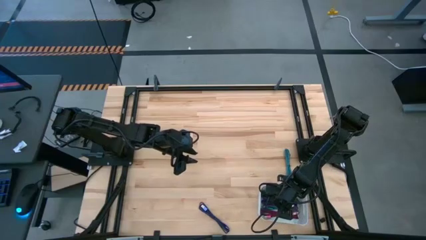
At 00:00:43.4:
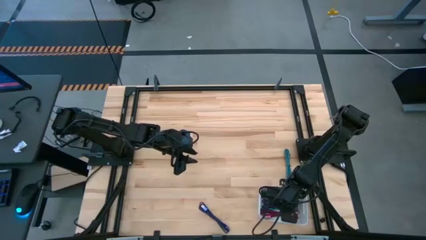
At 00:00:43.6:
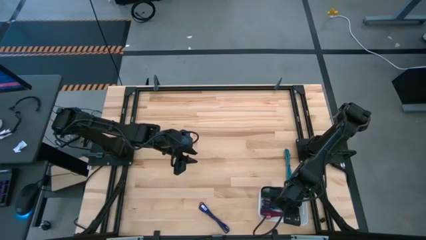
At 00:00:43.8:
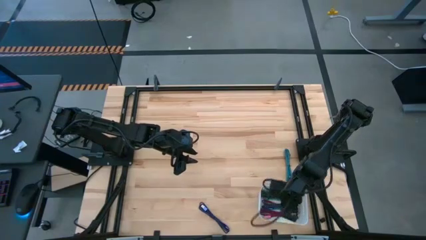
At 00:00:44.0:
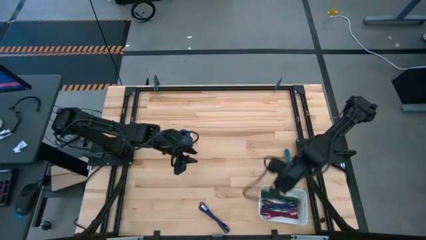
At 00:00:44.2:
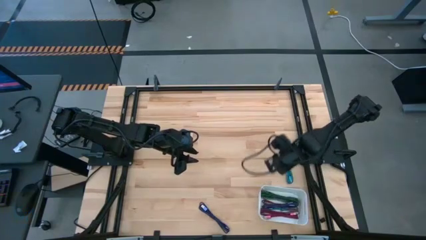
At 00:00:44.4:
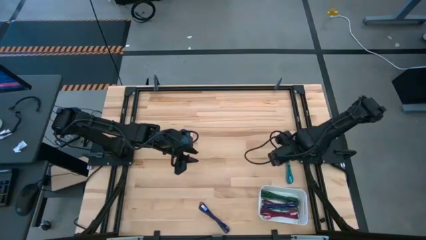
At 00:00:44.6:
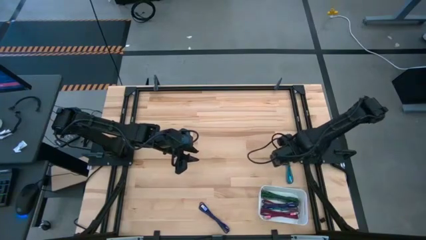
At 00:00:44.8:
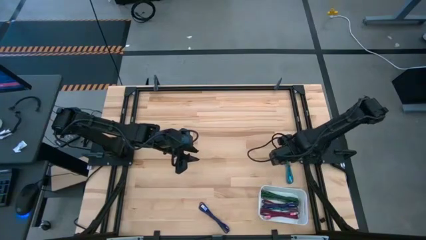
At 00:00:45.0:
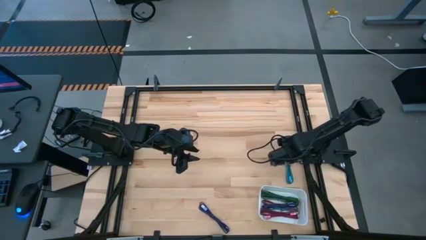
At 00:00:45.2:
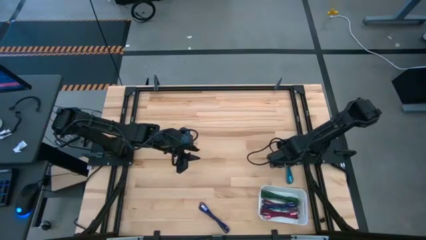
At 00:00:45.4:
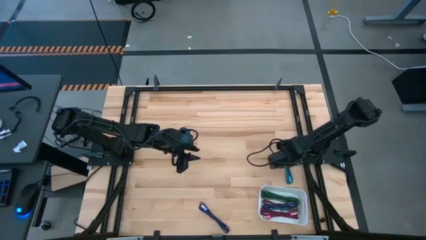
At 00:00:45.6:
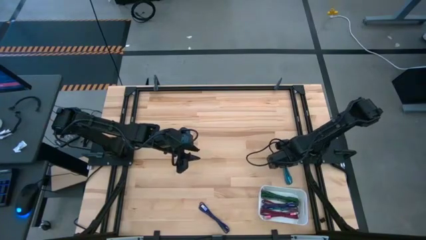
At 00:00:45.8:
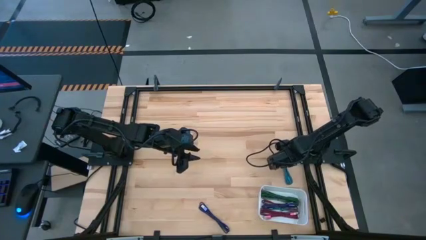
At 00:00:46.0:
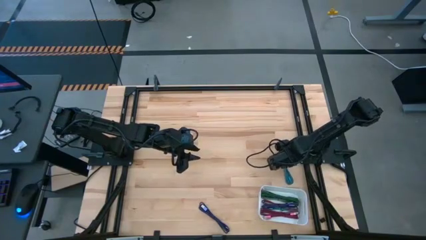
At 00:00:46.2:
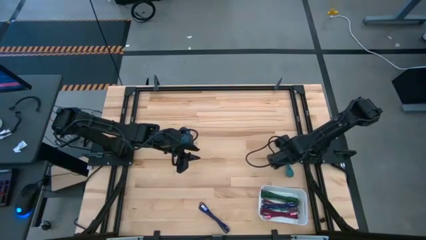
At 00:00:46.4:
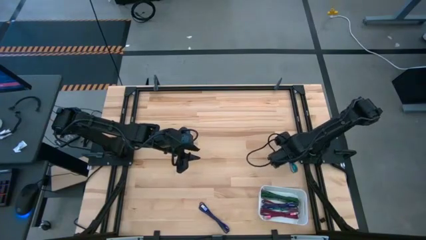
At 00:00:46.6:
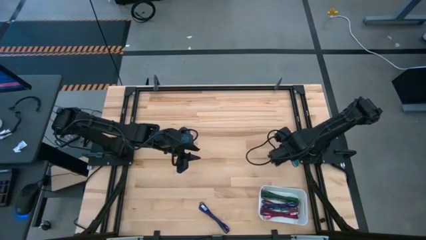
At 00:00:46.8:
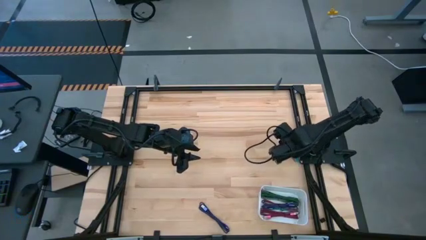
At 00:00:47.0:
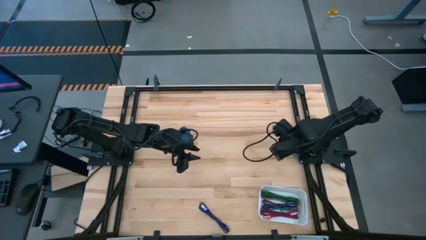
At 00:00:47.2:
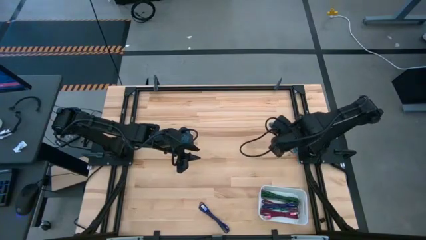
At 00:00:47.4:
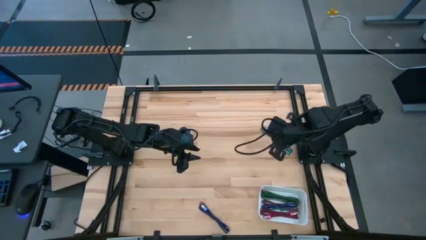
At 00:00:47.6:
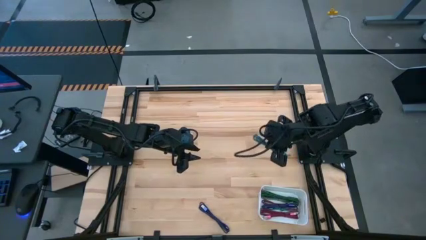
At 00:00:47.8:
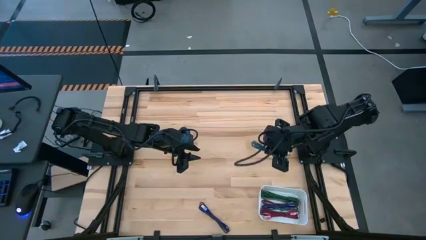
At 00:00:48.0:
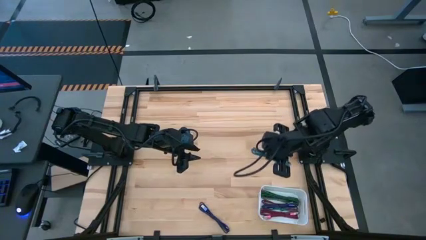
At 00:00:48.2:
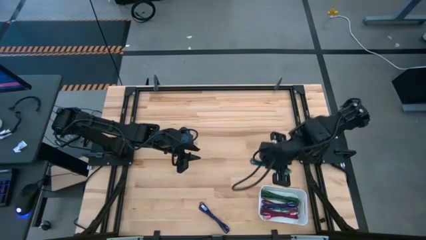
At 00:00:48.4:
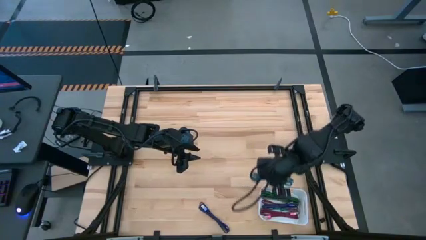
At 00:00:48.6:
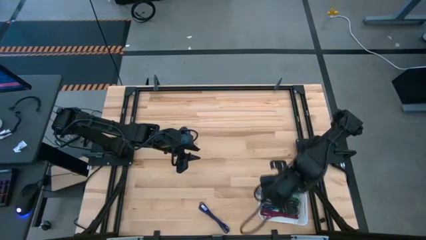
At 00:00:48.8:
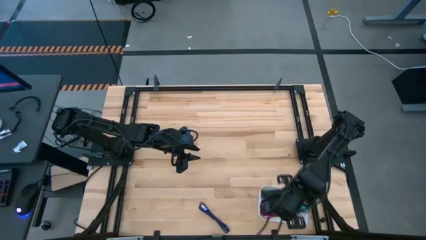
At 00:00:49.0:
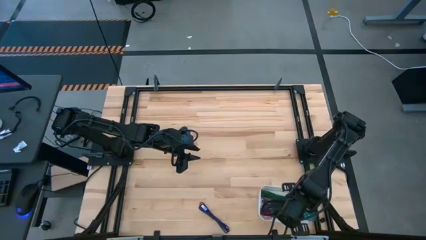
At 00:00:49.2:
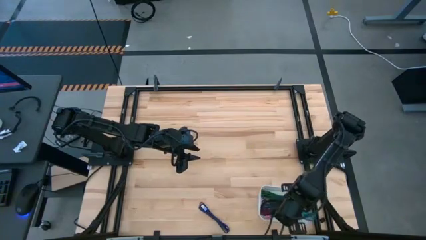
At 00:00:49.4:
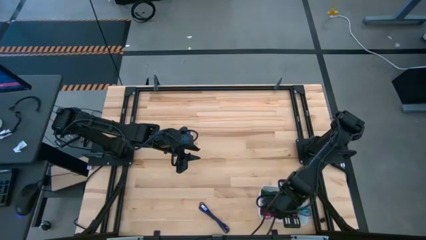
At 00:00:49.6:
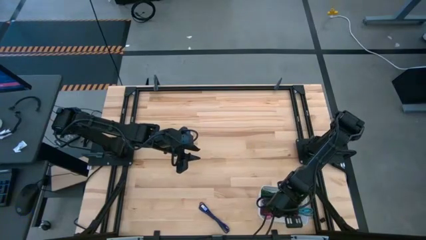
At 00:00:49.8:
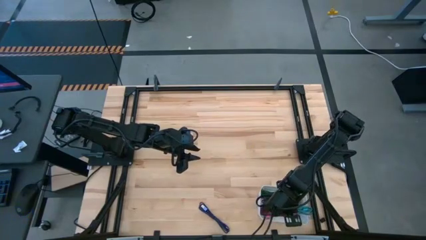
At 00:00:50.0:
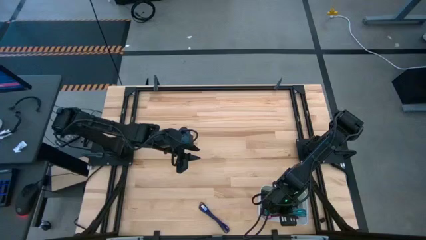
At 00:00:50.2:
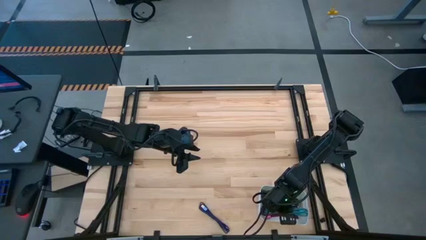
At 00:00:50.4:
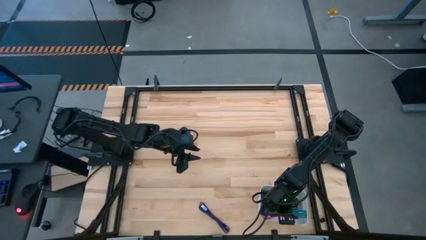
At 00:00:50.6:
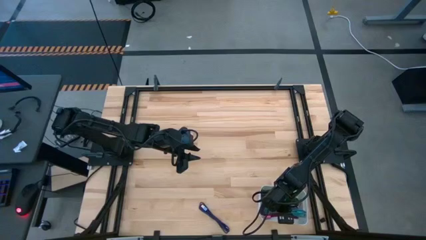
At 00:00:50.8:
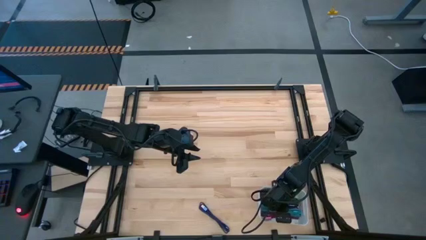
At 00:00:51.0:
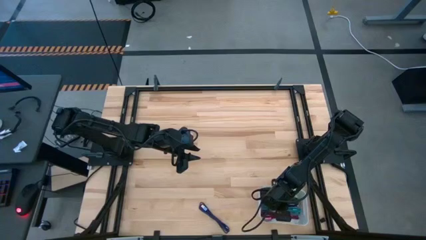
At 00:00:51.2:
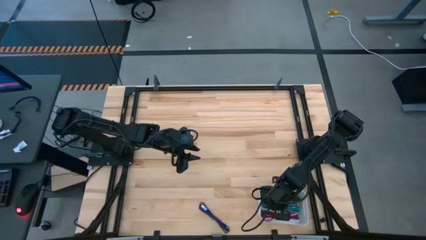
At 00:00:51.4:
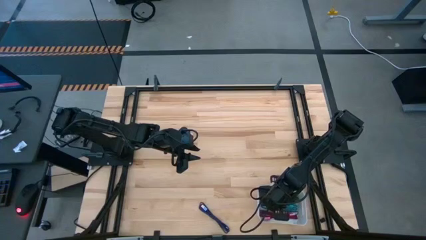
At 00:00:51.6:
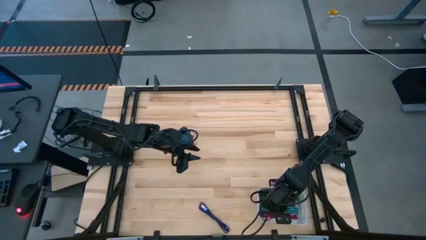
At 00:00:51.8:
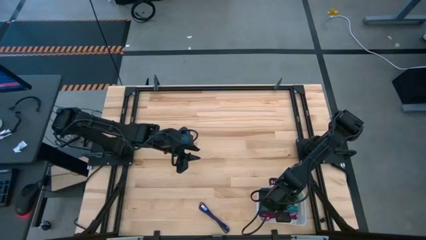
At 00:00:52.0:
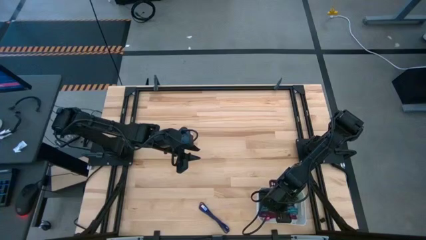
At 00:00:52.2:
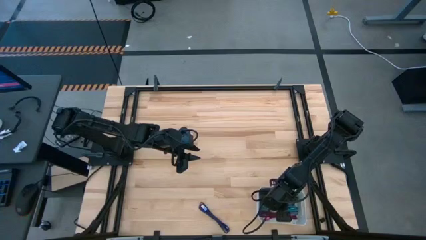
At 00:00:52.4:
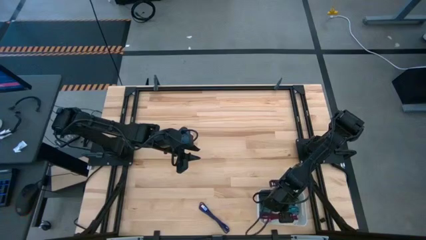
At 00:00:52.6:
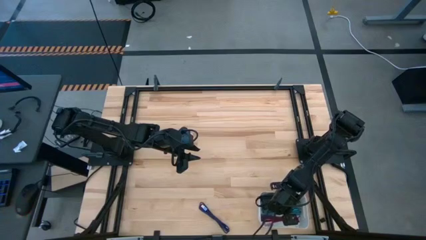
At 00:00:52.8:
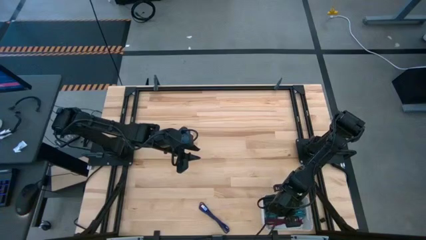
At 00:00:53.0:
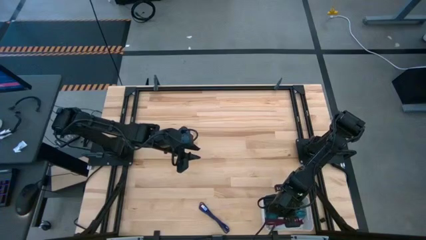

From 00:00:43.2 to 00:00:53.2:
Task: Pick and place USB-C Cables
Put the blue USB cable into the white bin

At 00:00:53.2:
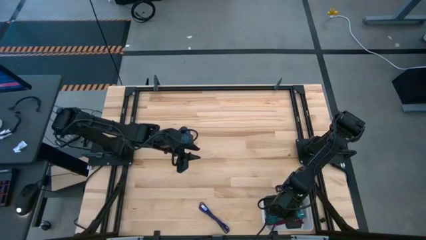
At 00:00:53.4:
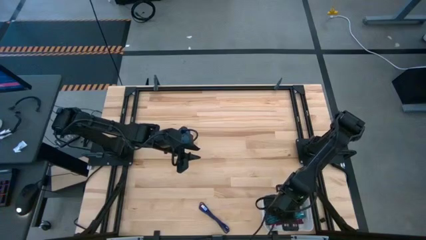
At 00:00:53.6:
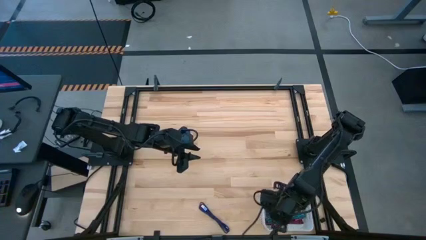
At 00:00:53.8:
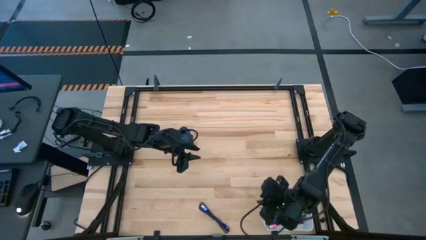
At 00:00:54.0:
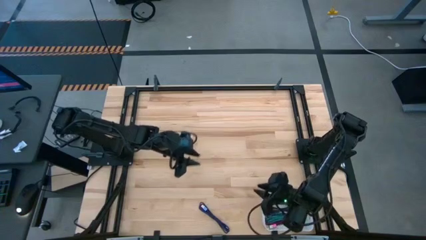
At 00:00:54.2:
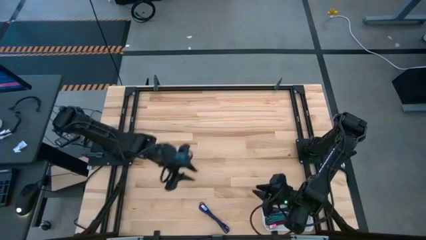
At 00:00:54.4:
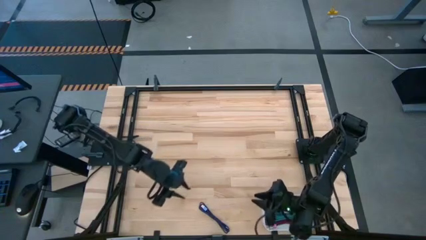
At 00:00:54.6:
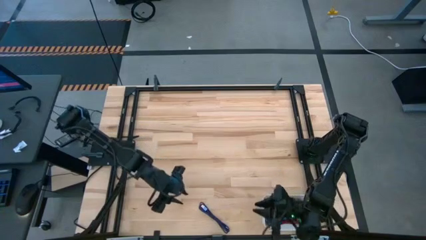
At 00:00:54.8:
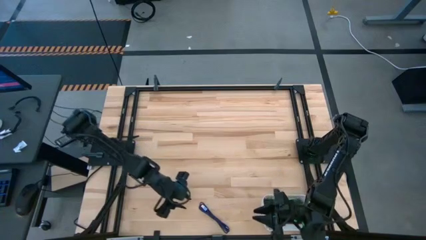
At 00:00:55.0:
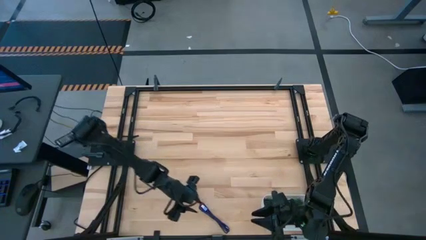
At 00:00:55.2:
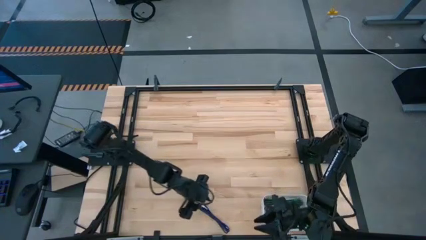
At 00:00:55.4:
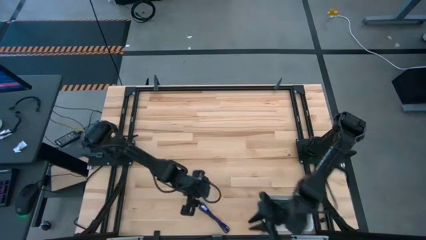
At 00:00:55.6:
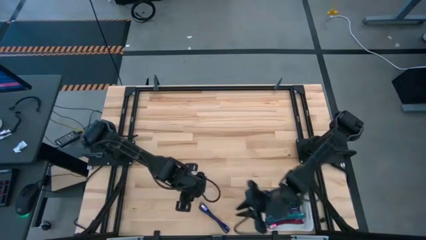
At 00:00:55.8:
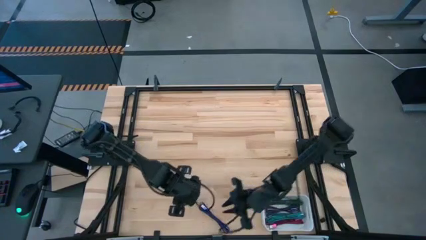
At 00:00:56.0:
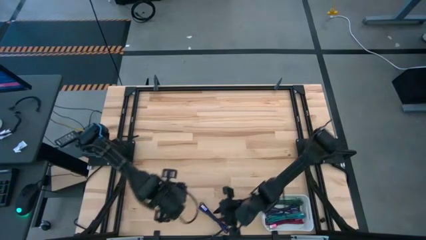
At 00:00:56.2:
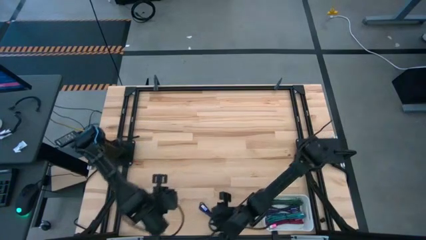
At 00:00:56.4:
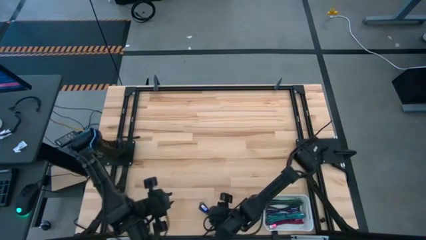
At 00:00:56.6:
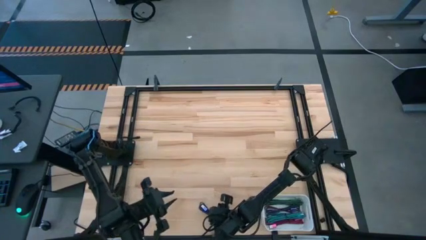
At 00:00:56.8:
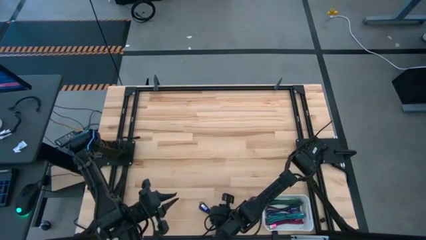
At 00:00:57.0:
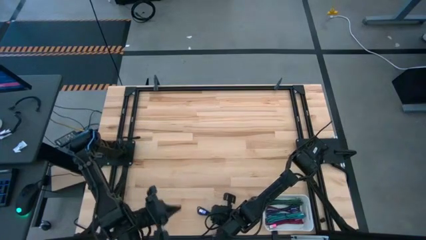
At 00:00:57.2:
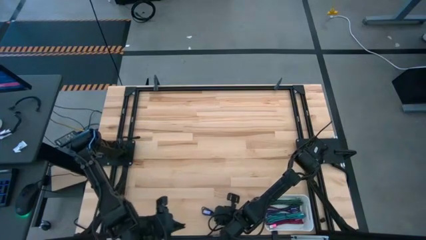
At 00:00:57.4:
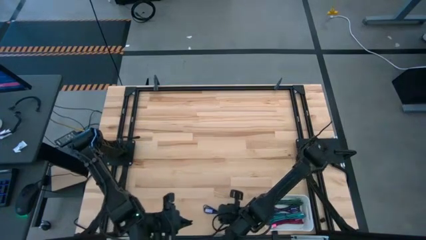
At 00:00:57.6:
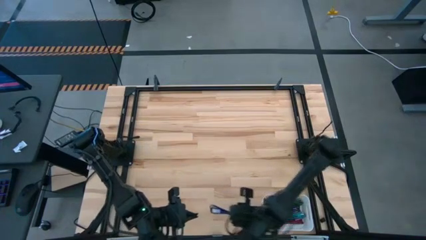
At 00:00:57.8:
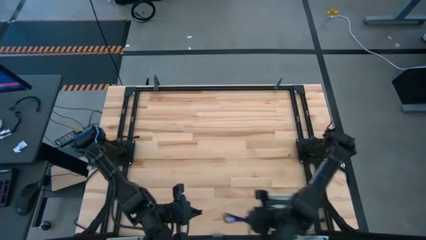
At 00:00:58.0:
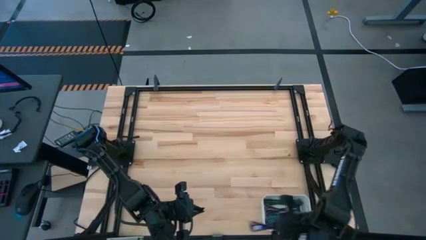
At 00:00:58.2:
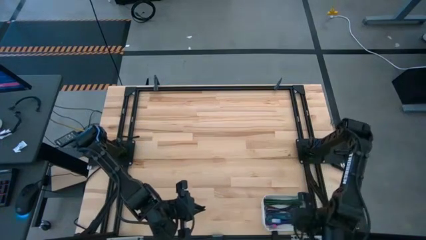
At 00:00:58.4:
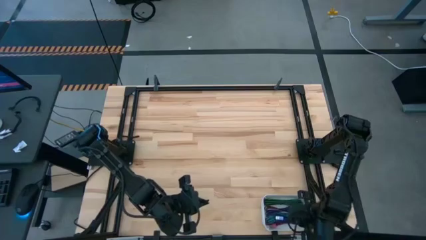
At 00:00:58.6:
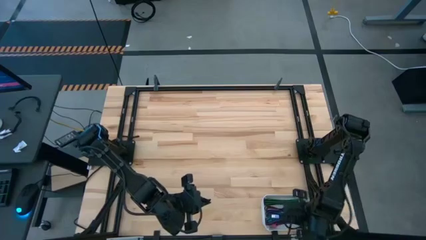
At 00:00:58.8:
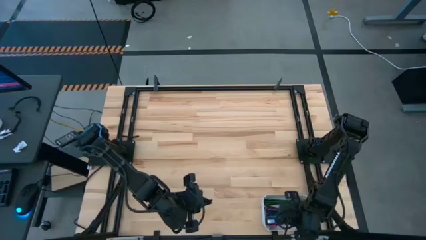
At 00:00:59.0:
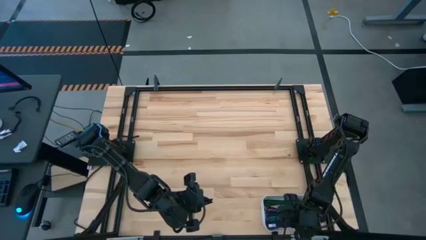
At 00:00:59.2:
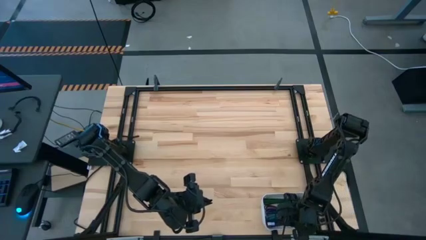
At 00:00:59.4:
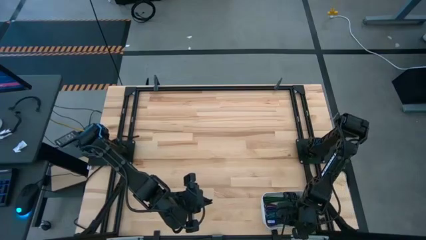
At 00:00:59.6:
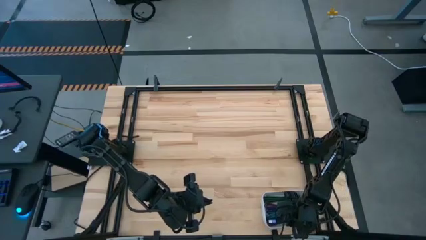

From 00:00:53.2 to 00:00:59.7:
Put the purple USB cable into the white bin
